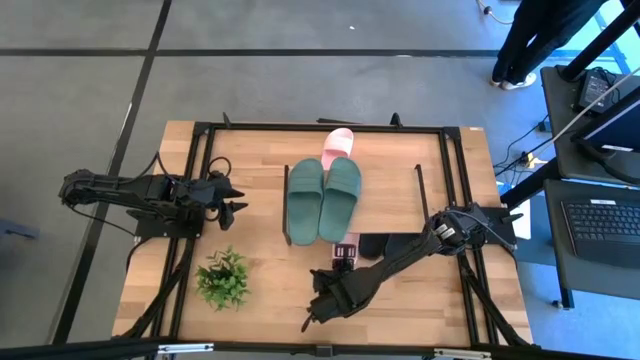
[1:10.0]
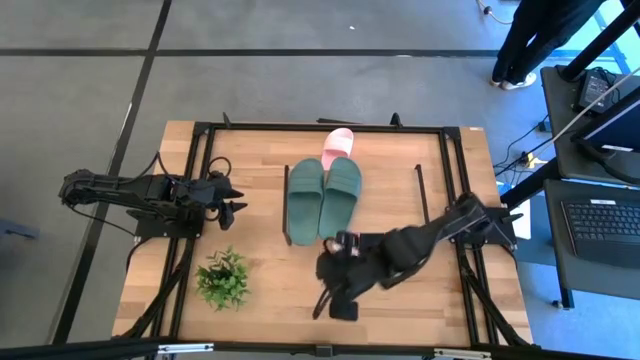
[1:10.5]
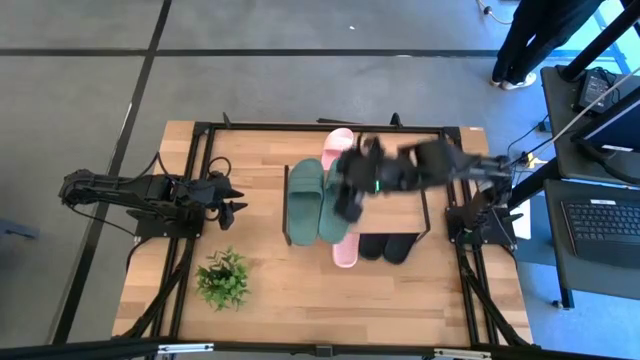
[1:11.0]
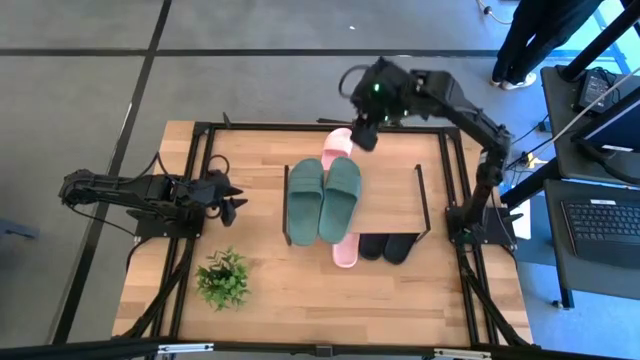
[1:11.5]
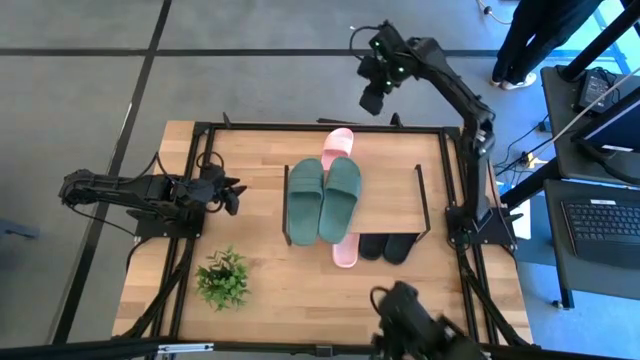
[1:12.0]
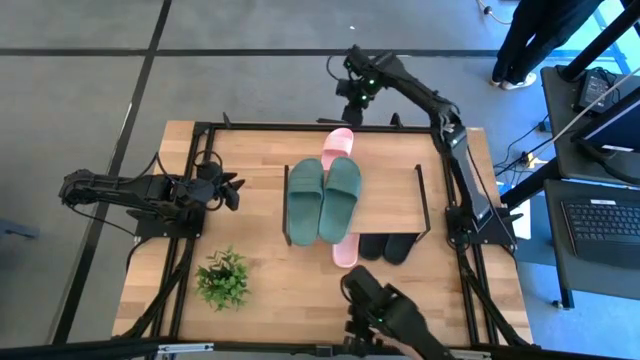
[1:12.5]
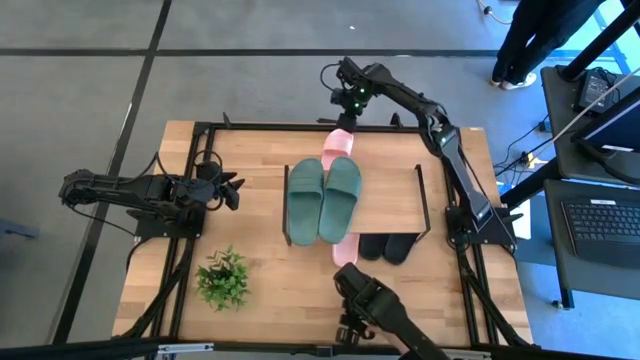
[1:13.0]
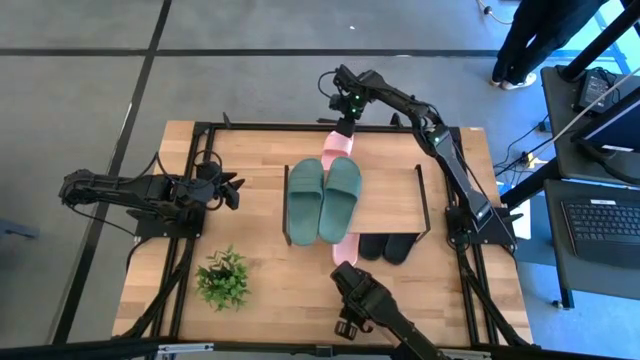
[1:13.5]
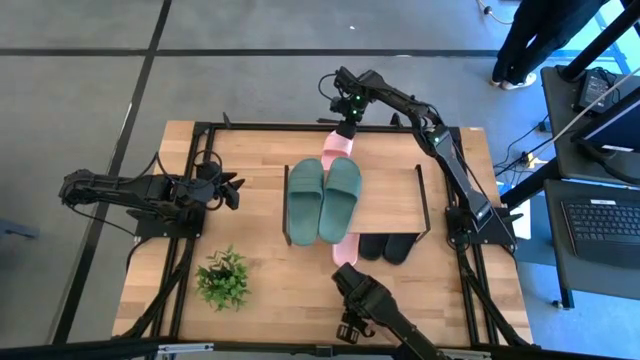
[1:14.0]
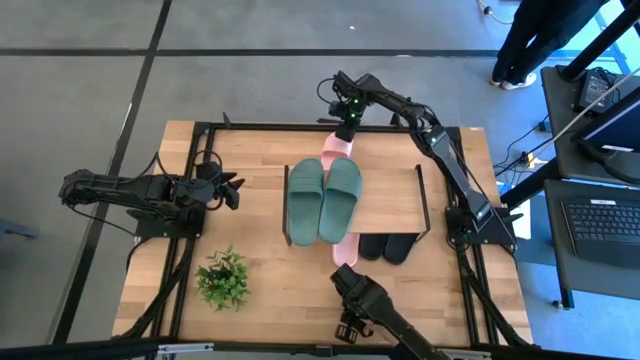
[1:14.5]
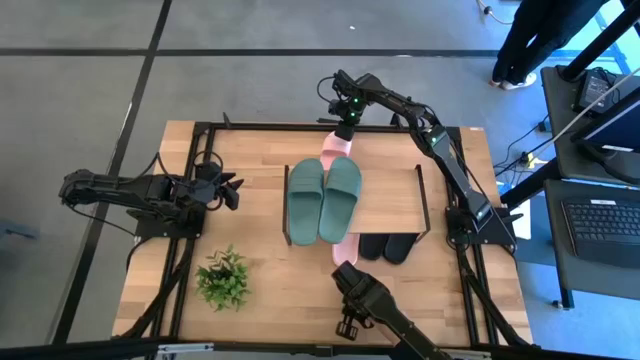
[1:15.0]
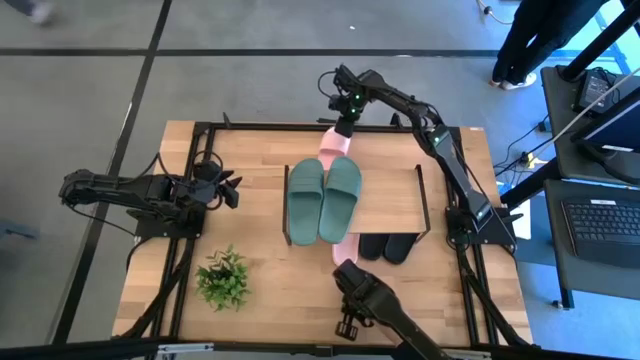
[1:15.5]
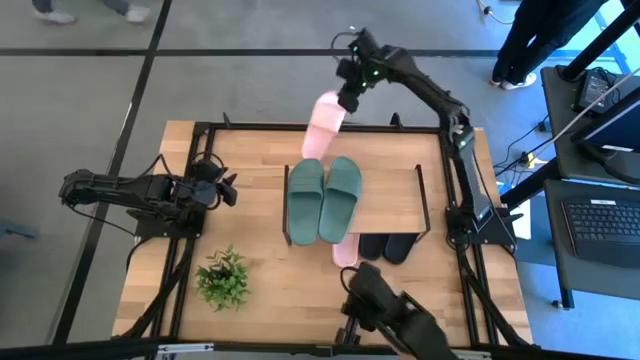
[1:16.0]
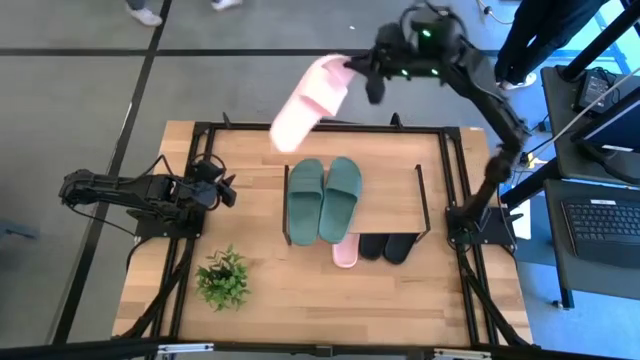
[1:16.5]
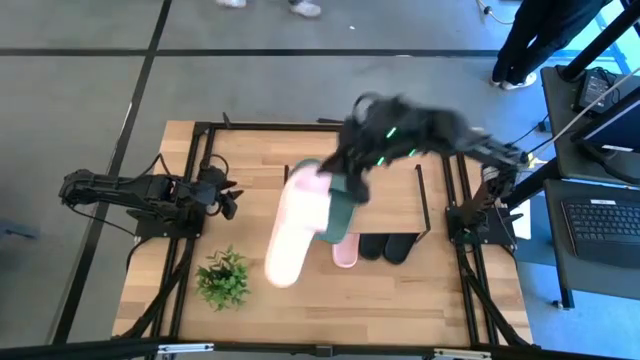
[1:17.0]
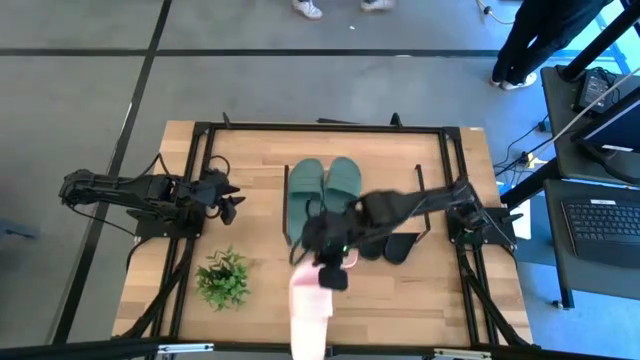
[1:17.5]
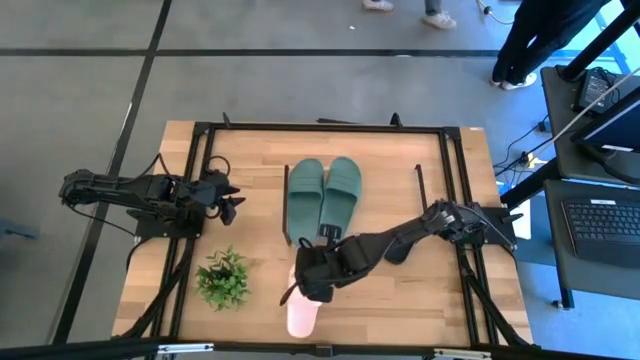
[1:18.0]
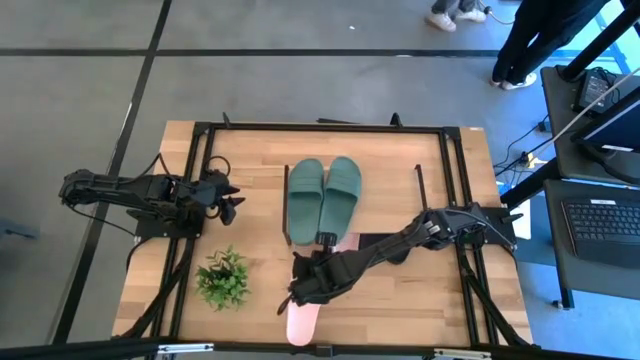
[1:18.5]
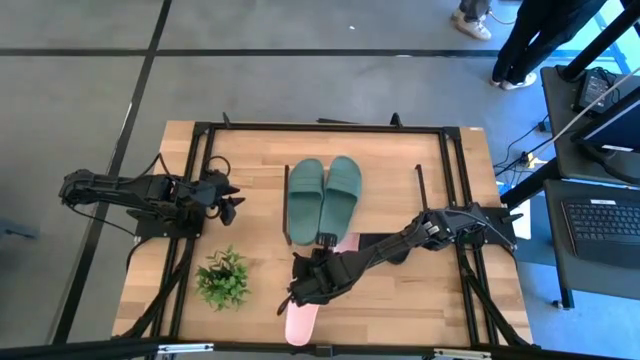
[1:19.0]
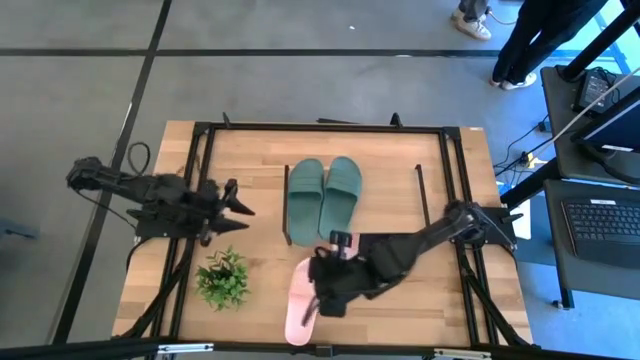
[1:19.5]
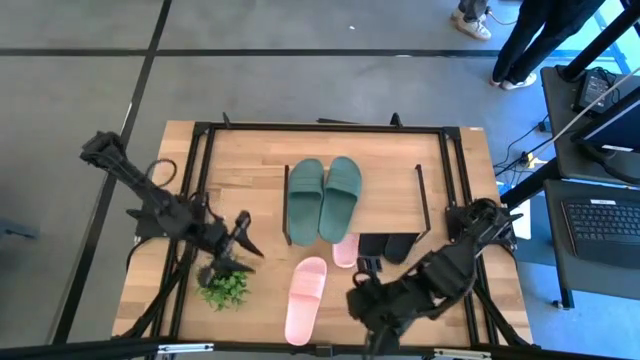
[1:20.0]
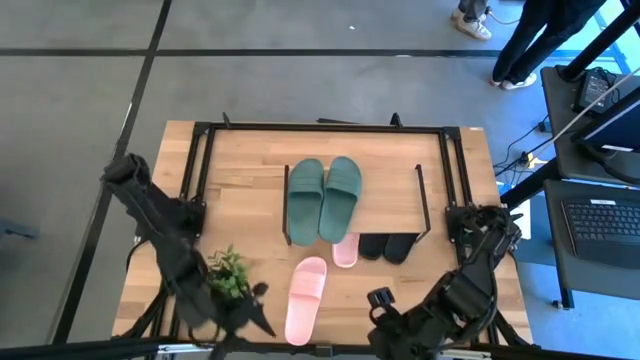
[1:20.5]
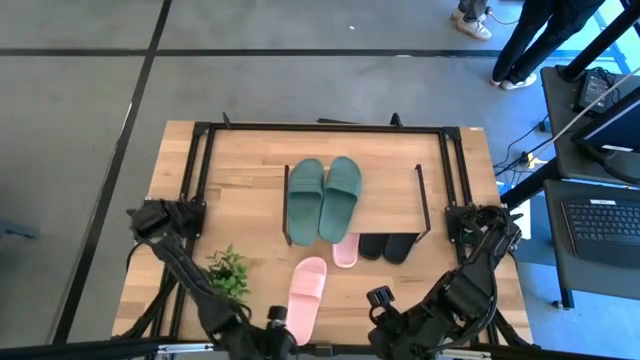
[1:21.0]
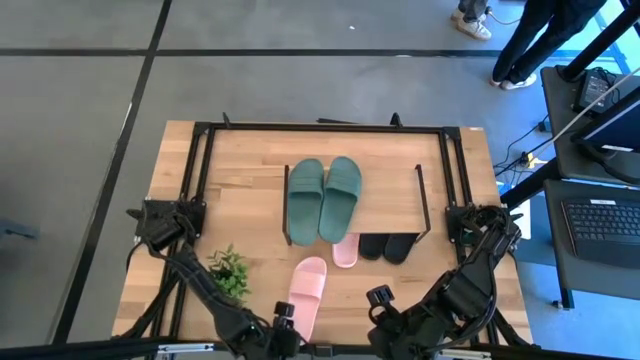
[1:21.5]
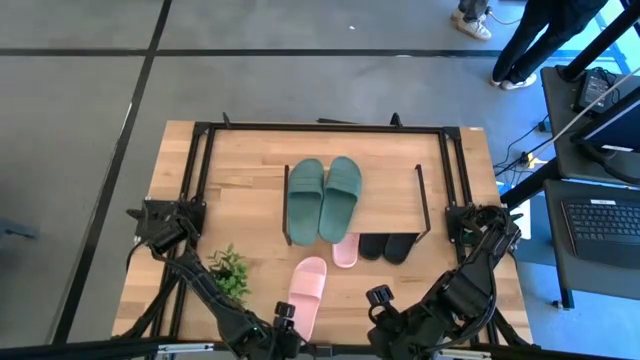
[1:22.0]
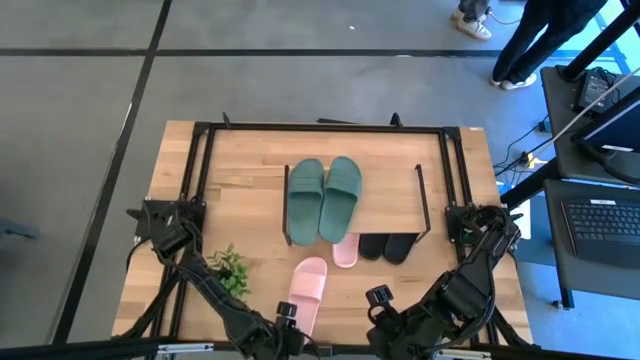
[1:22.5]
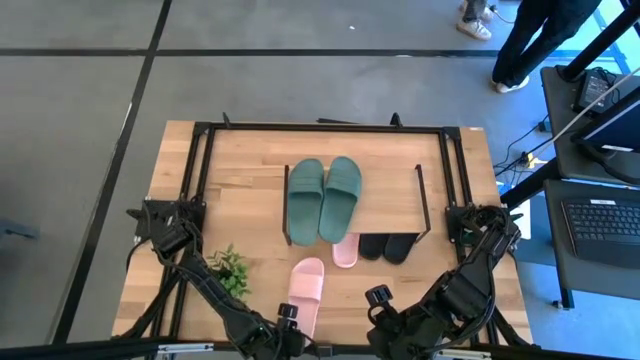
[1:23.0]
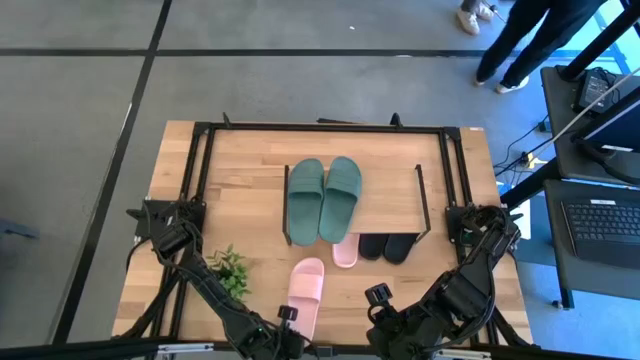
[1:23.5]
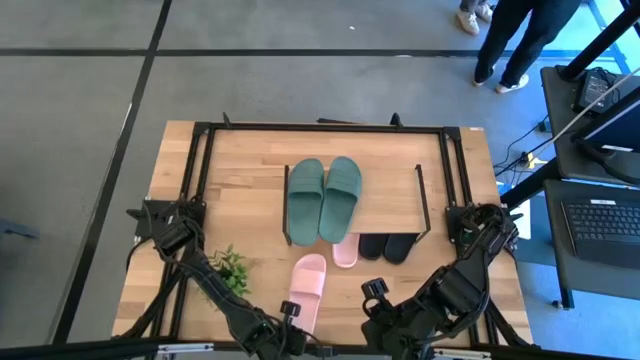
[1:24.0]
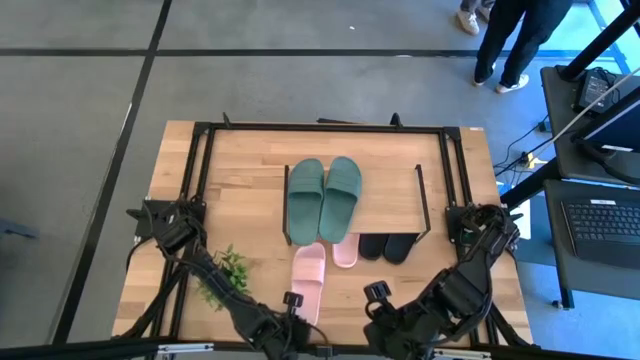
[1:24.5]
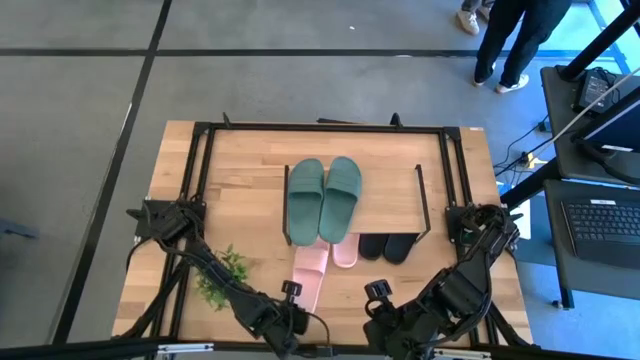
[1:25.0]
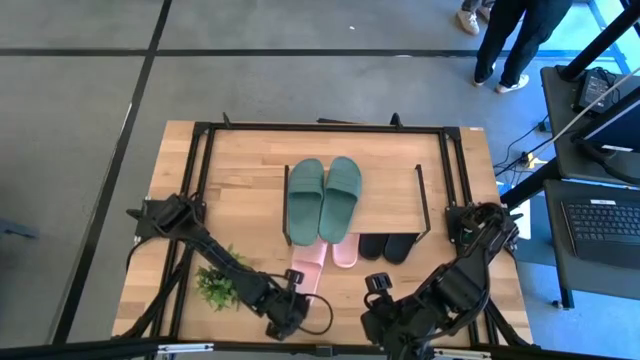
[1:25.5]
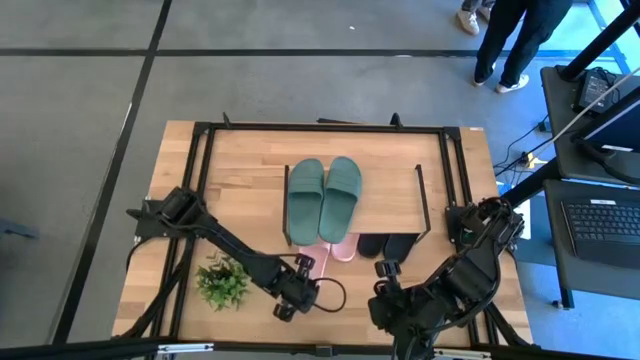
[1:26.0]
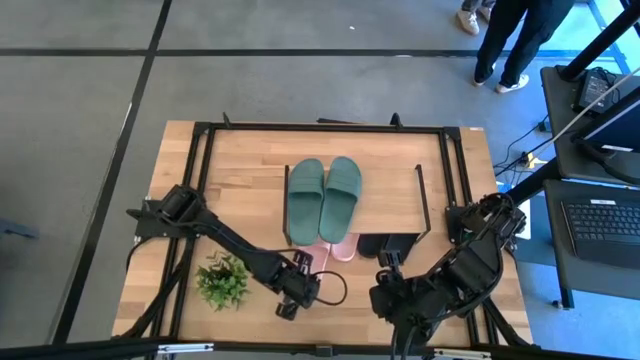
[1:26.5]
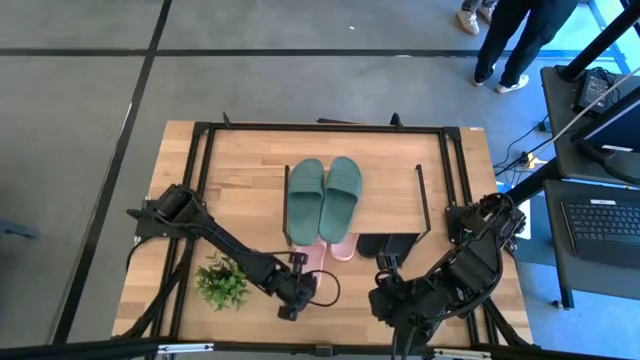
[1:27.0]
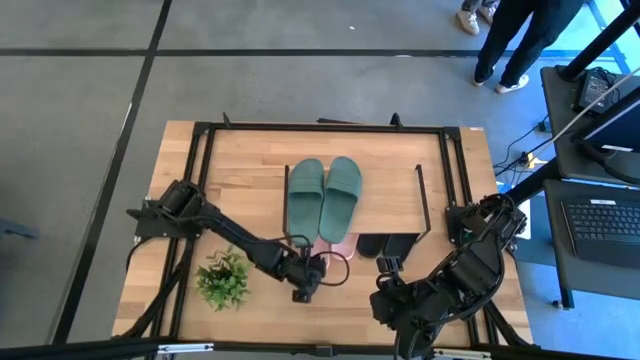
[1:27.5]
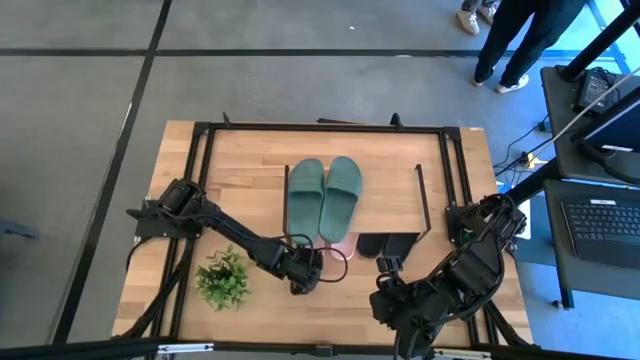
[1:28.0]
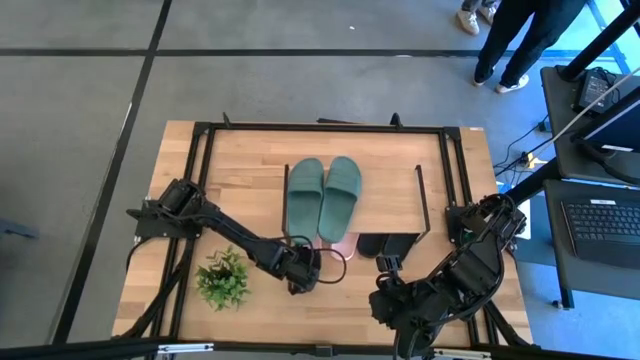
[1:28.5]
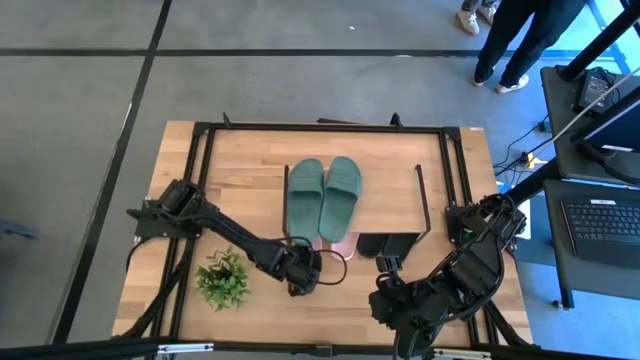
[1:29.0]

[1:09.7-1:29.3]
Task: Pick and place slides into the shelf
Put the left pink slipper under the shelf

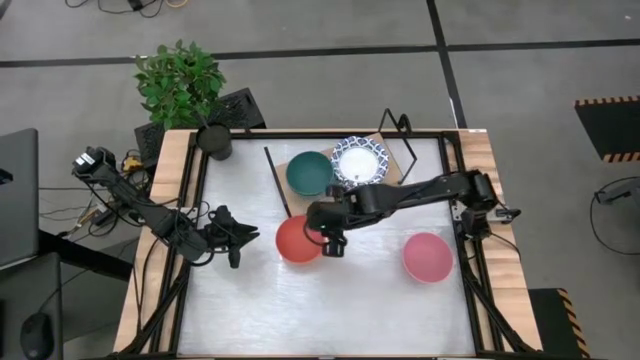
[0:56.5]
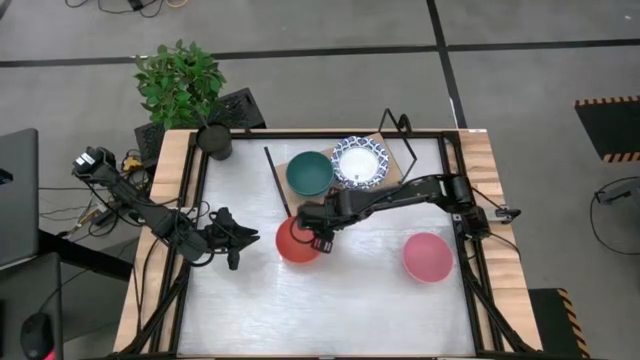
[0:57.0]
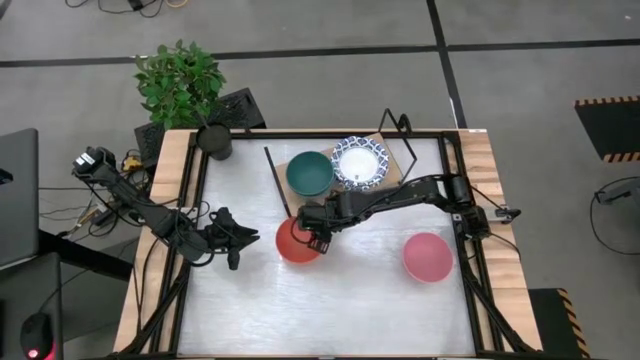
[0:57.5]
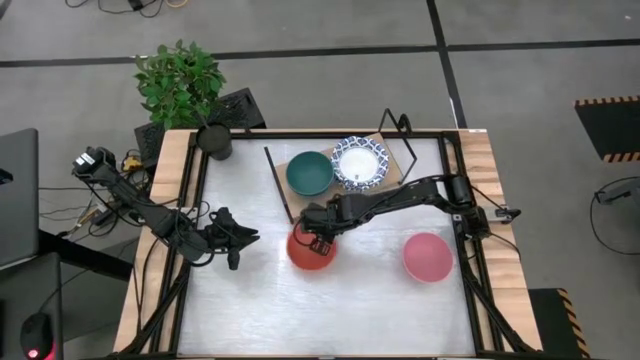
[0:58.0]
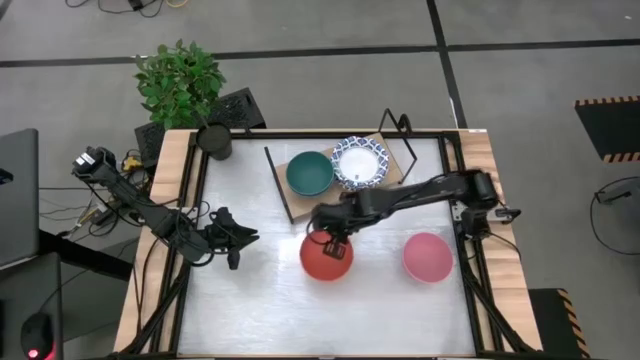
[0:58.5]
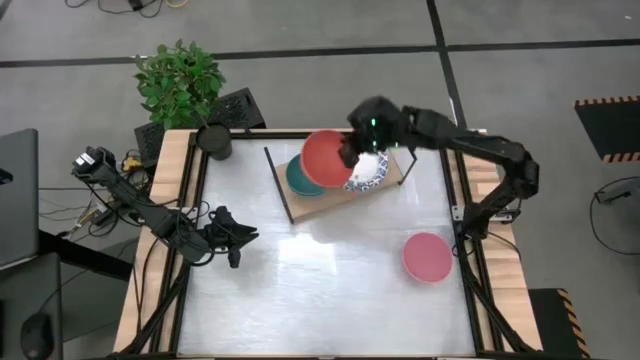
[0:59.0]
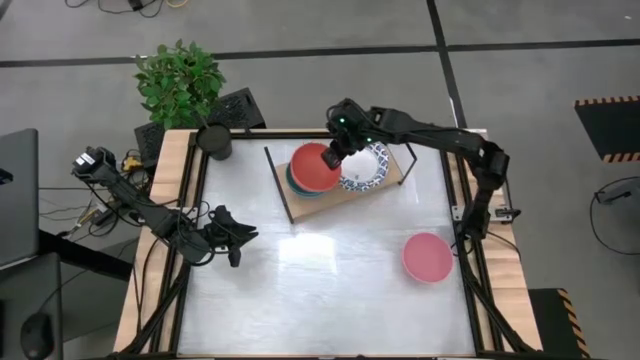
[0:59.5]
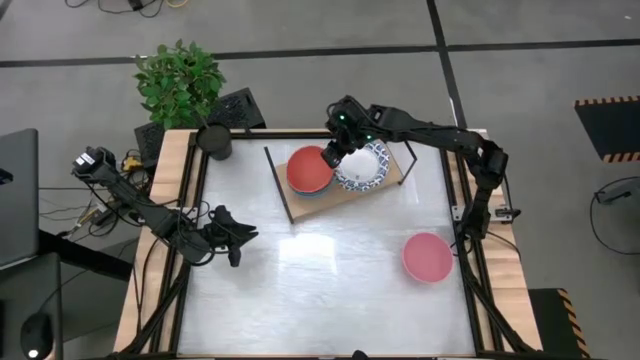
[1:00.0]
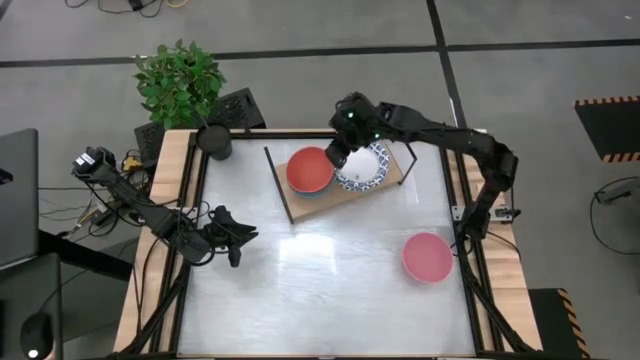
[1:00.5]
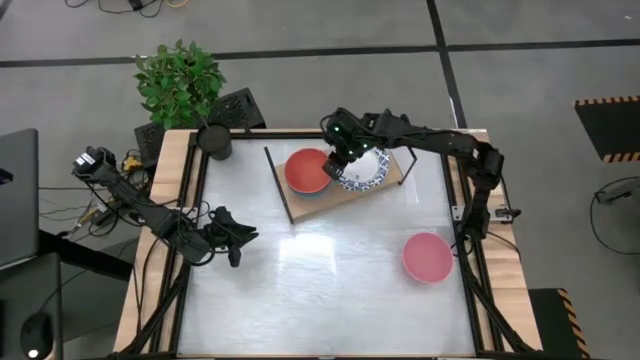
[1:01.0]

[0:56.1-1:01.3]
Task: Place and stack bowls onto a shelf
Stack the orange bowl on top of the green bowl
